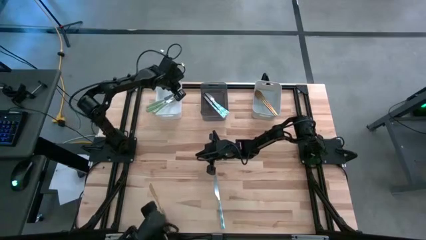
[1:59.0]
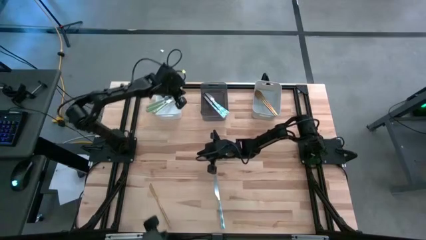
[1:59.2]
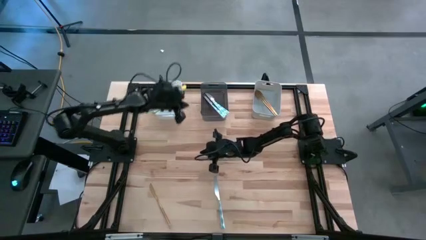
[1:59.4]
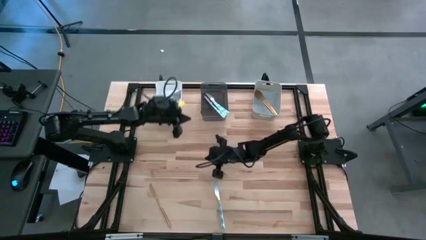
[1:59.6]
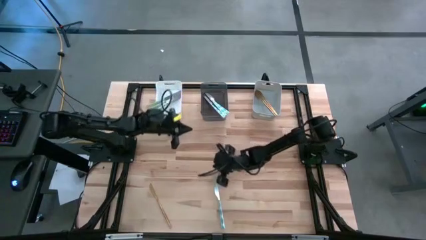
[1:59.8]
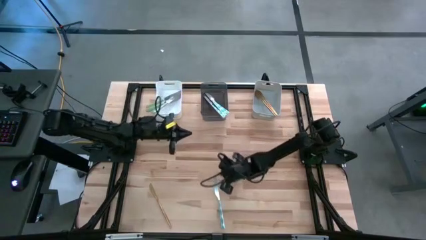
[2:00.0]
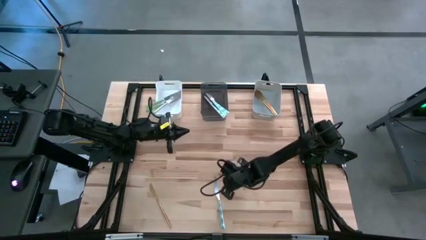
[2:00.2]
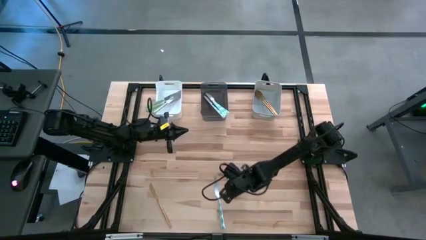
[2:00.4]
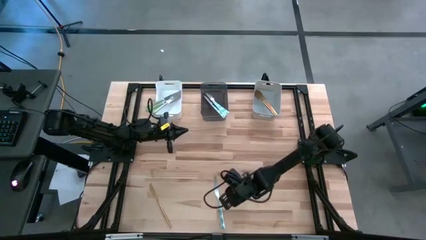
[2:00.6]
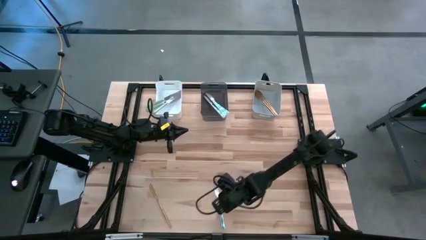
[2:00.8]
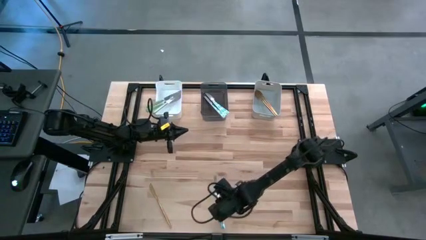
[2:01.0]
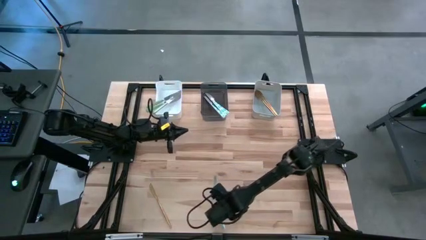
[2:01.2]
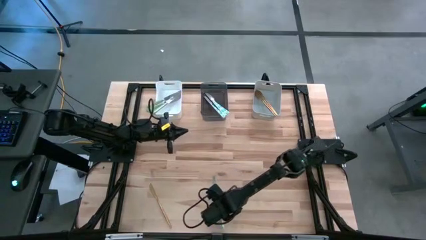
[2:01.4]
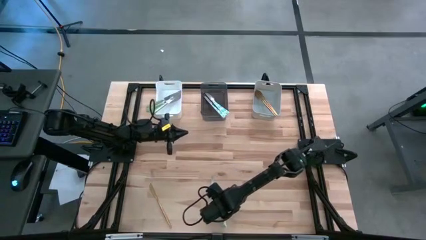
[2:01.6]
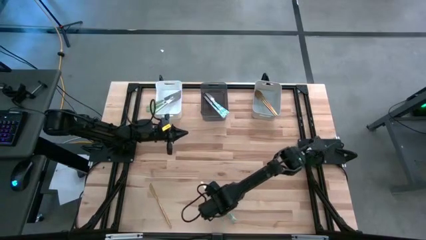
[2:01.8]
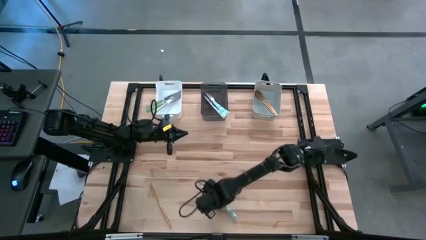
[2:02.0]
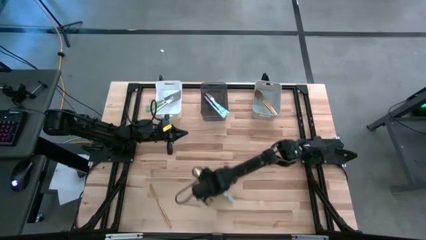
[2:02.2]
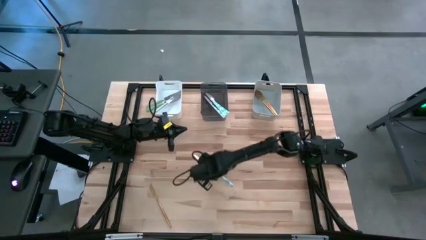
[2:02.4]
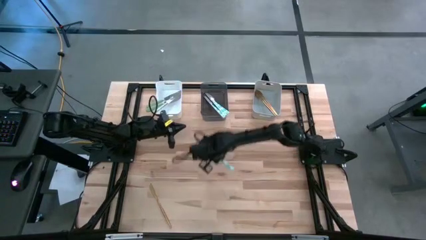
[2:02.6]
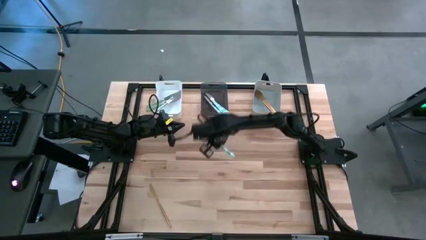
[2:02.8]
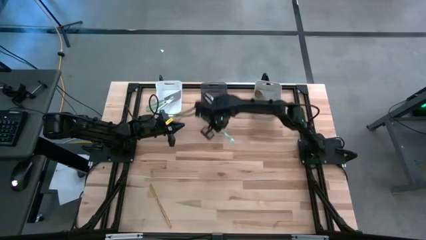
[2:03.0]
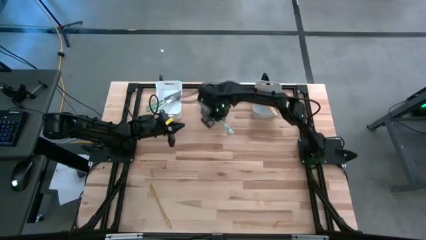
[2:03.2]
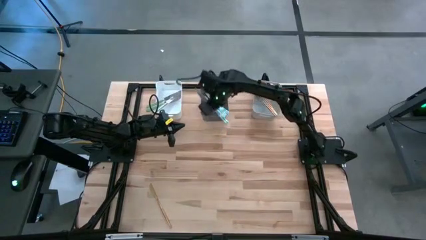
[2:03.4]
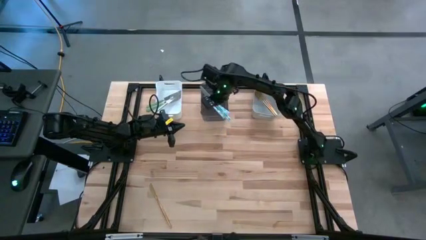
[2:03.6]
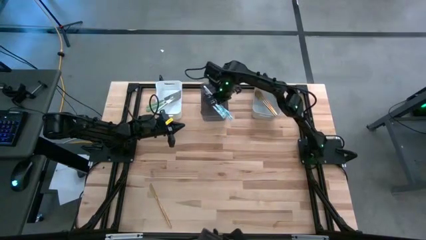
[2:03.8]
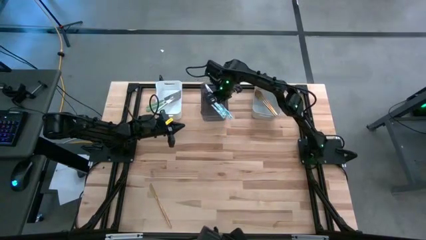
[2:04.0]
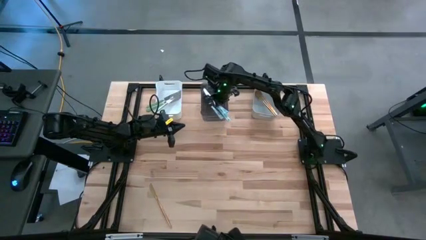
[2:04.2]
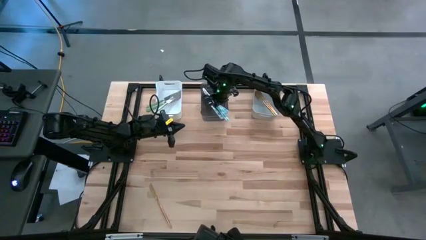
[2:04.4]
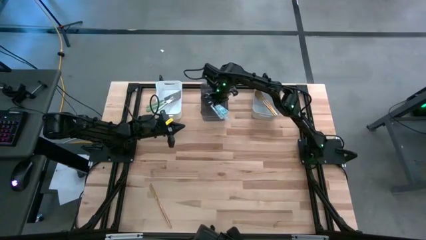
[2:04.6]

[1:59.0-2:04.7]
Task: Sort silverware by color (type)
Put the blue table knife into the black bin

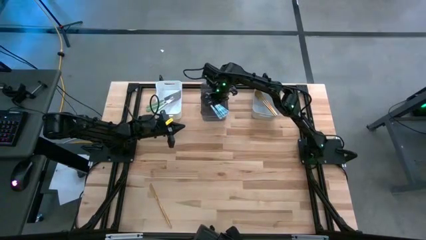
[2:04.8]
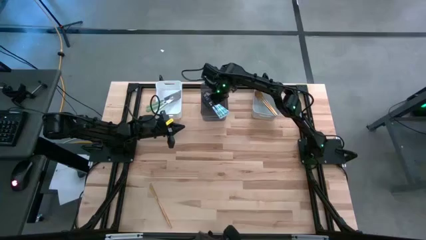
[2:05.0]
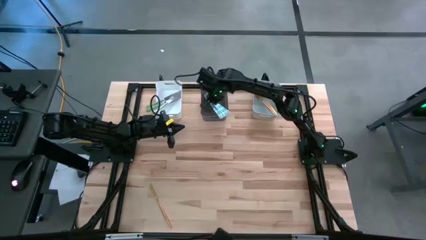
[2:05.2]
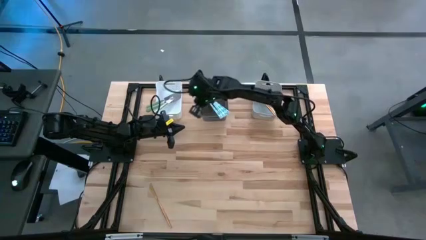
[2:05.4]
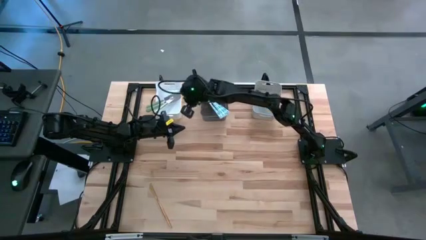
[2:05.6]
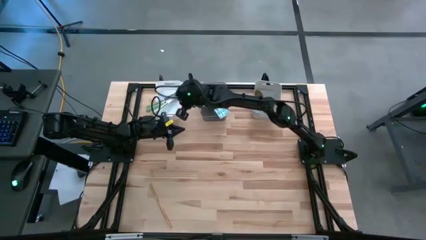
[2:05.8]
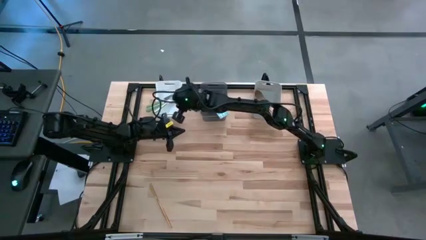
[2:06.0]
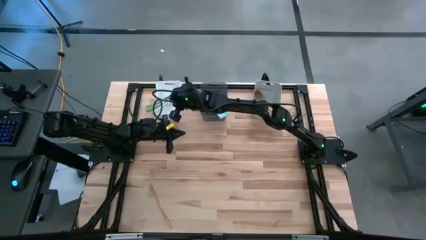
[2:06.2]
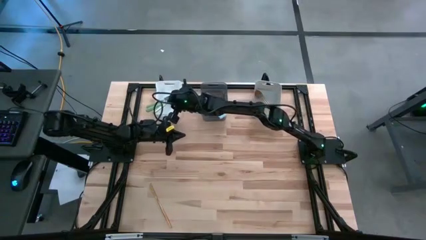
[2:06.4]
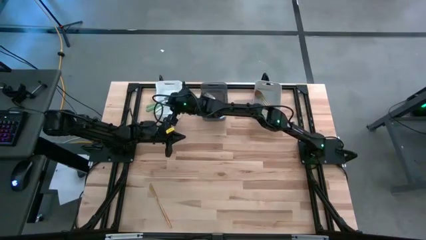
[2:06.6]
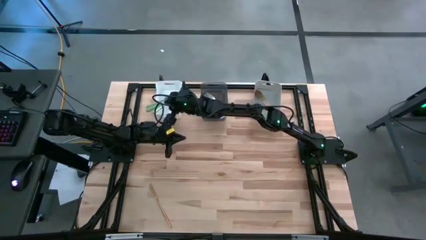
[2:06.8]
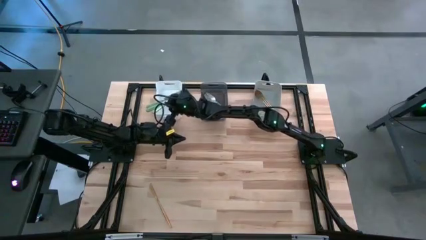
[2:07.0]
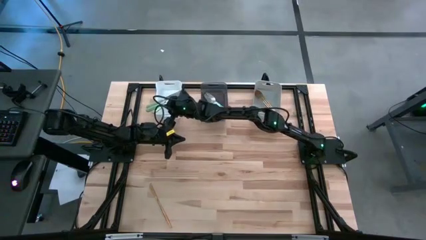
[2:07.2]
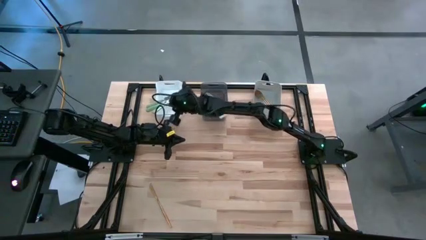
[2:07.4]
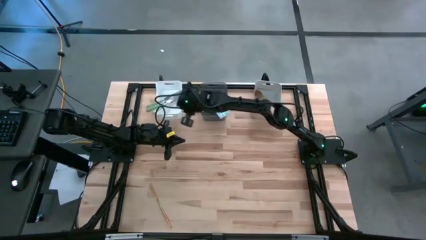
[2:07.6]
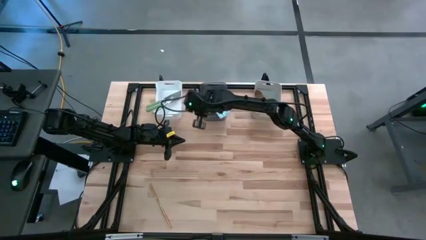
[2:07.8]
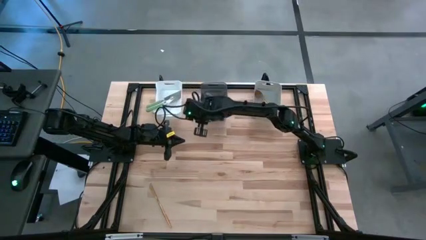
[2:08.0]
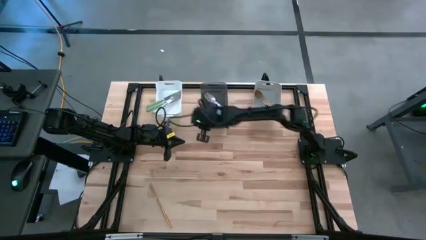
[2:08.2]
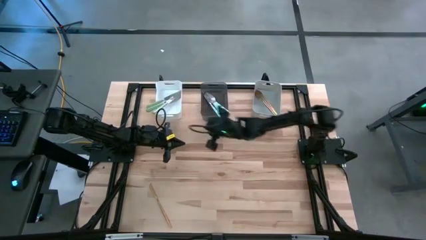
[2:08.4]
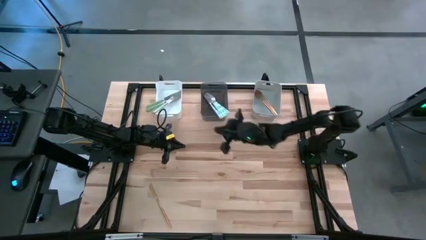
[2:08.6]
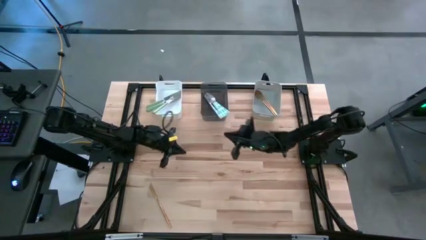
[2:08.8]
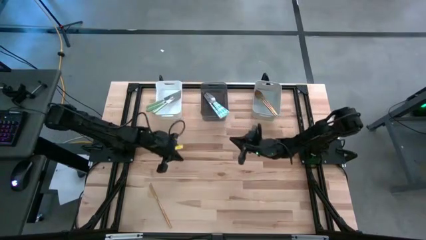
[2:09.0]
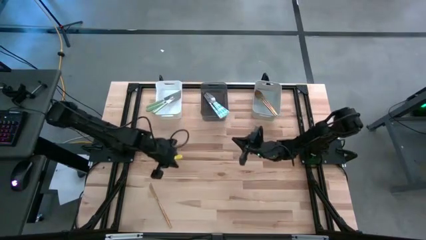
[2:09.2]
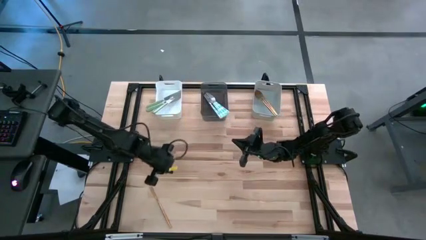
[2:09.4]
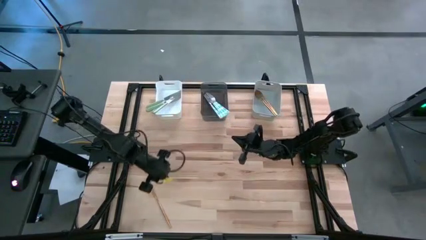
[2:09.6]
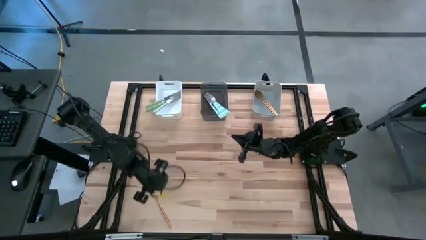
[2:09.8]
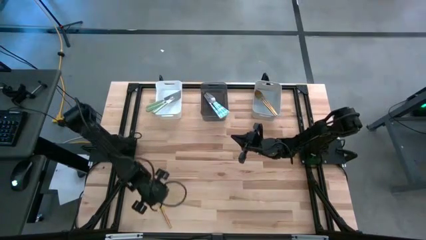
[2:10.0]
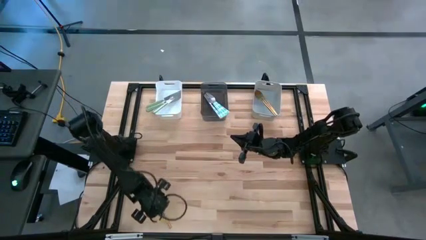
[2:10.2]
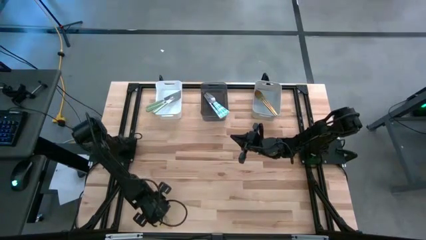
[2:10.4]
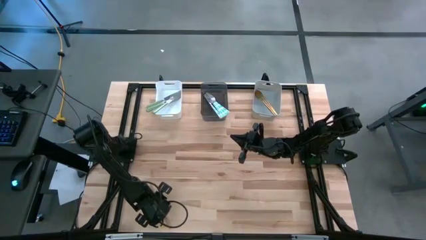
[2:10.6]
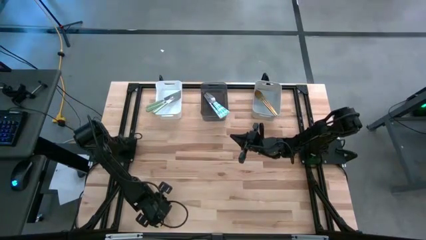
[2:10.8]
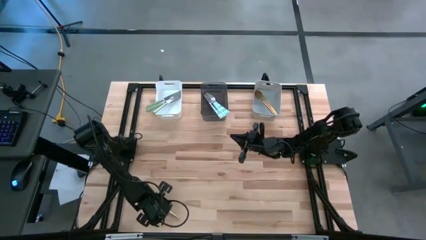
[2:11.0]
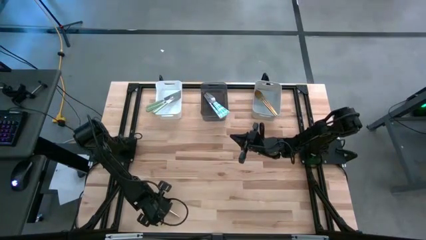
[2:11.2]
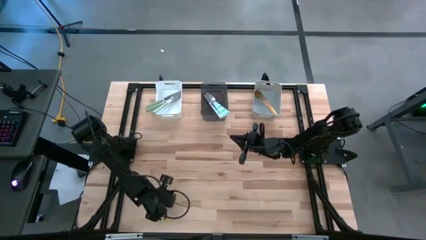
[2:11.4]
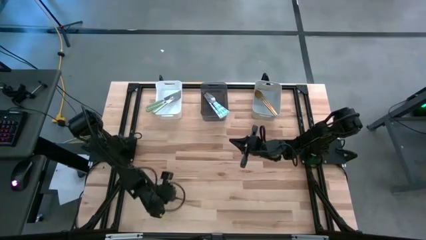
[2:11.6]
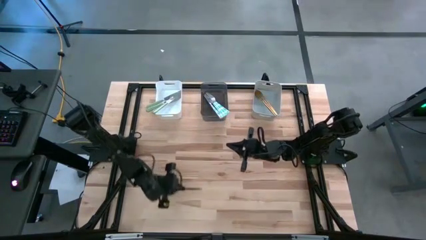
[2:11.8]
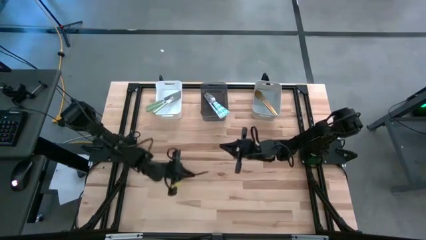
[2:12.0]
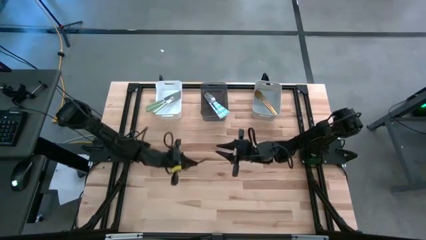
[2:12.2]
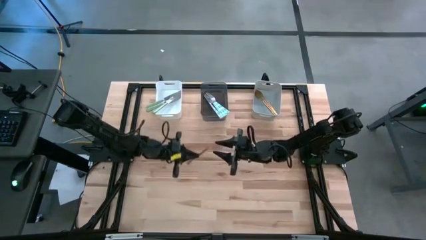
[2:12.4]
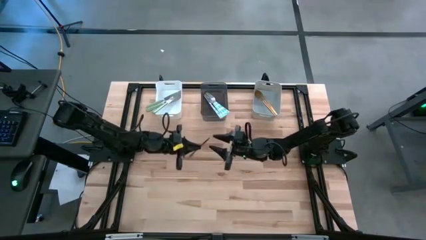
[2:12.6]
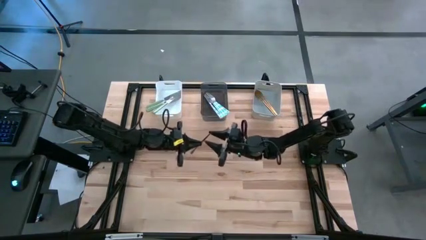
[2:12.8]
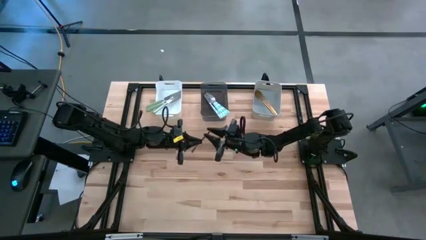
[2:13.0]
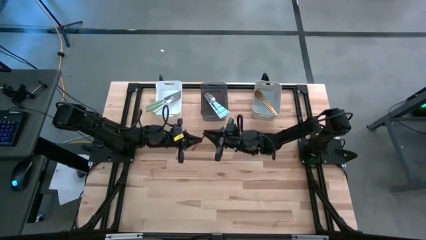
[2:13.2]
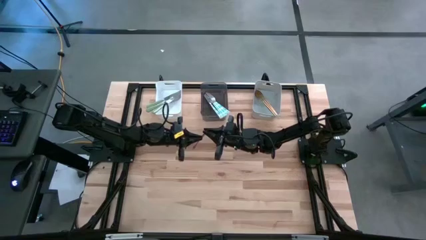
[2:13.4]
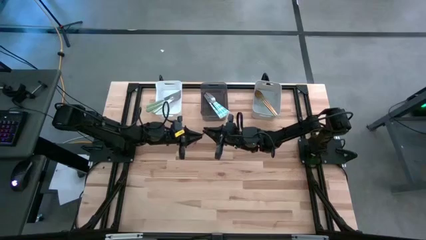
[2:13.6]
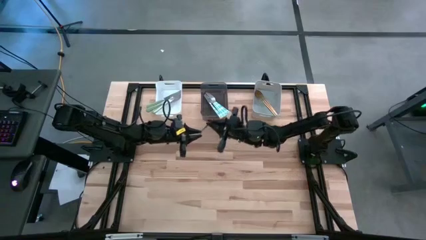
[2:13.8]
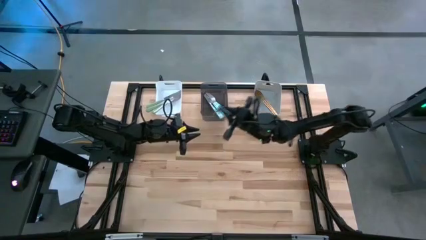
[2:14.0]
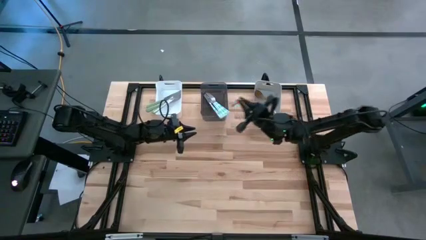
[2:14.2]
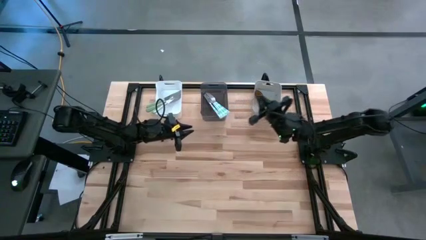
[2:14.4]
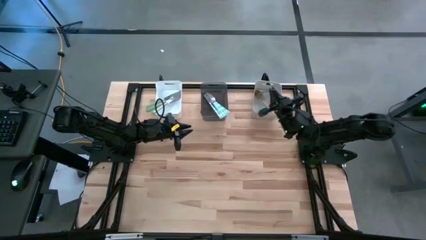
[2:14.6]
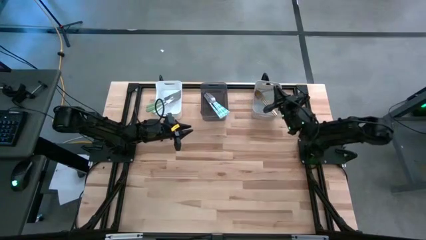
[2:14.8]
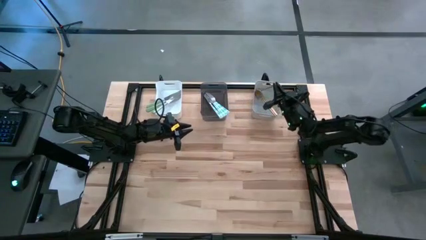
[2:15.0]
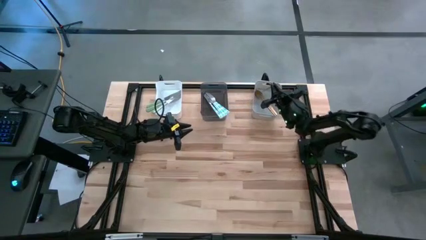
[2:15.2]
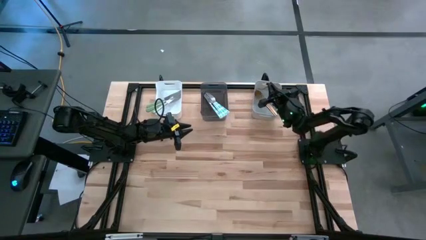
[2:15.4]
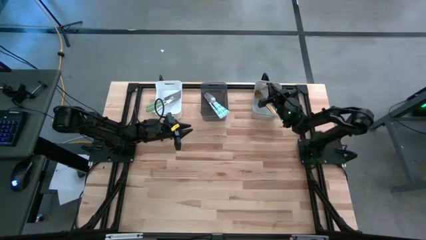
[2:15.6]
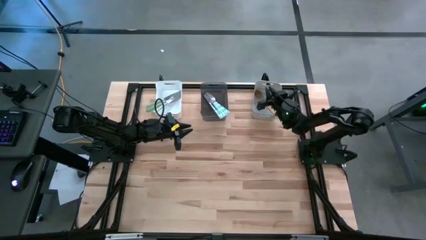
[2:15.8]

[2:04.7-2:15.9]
Put the yellow table knife into the gray bin
